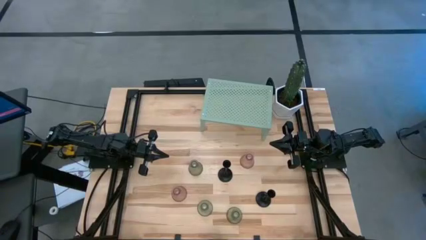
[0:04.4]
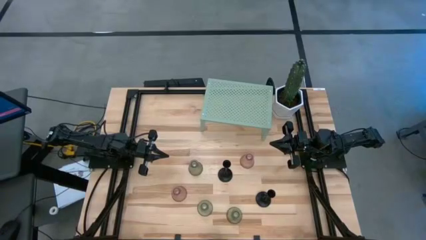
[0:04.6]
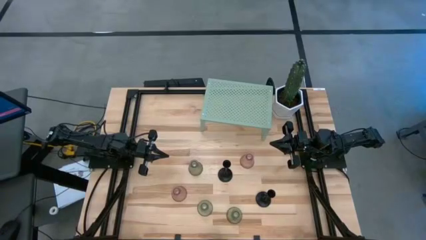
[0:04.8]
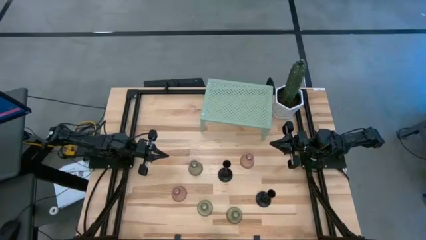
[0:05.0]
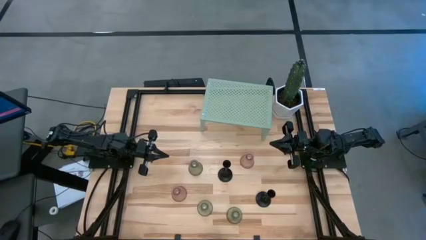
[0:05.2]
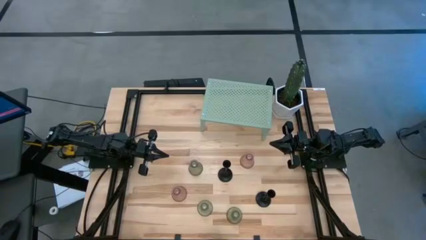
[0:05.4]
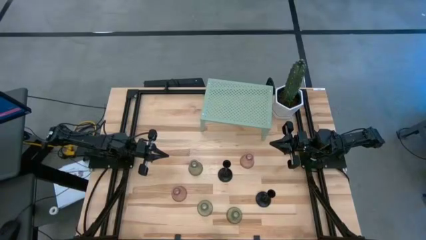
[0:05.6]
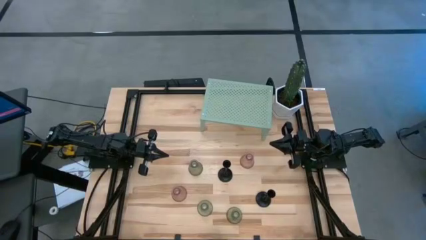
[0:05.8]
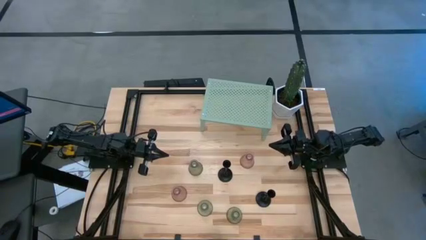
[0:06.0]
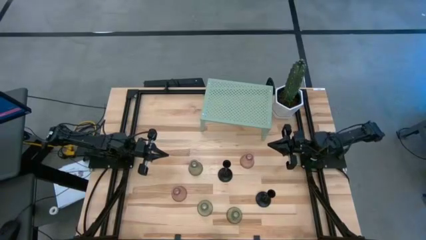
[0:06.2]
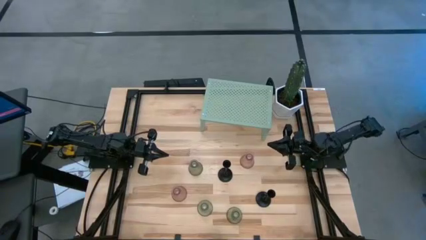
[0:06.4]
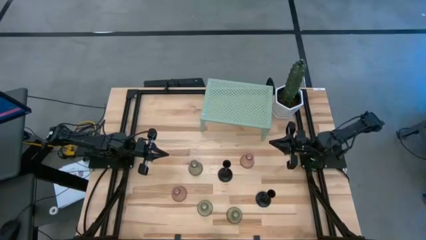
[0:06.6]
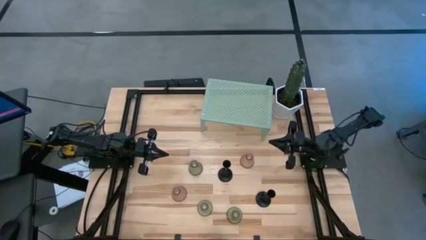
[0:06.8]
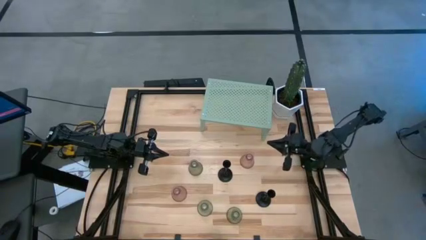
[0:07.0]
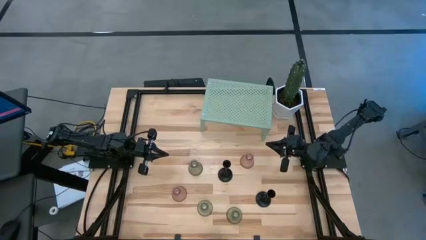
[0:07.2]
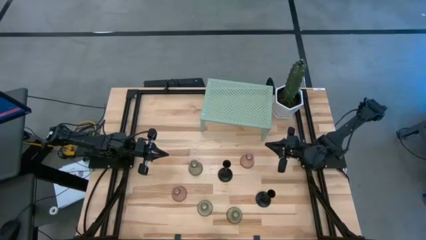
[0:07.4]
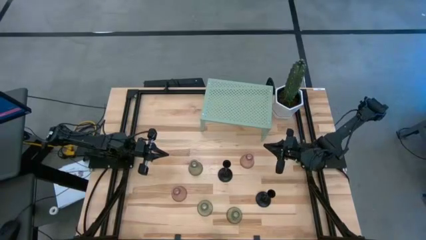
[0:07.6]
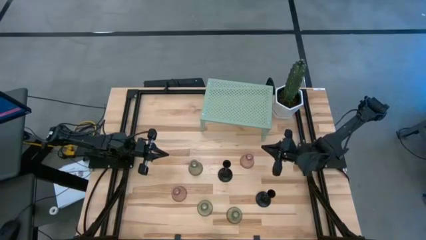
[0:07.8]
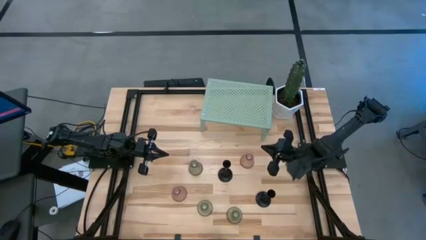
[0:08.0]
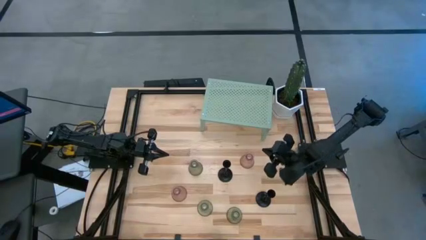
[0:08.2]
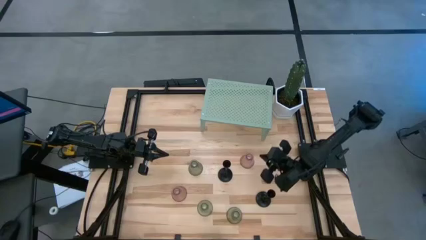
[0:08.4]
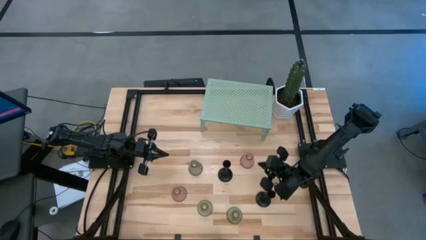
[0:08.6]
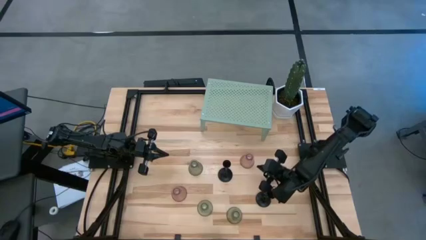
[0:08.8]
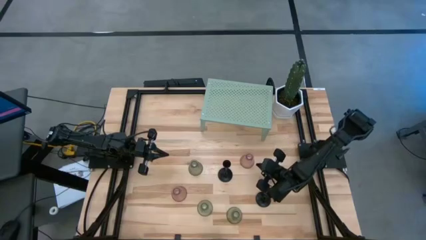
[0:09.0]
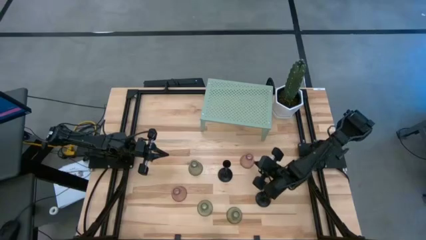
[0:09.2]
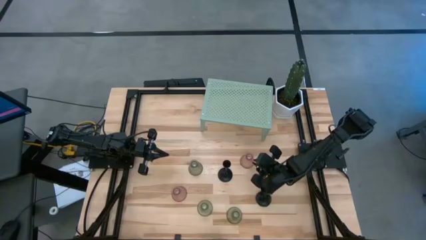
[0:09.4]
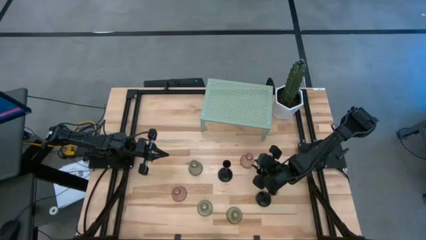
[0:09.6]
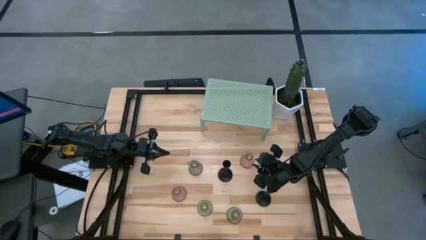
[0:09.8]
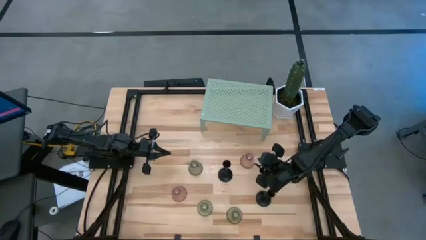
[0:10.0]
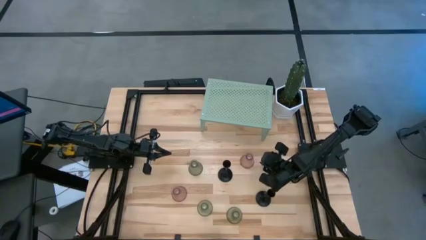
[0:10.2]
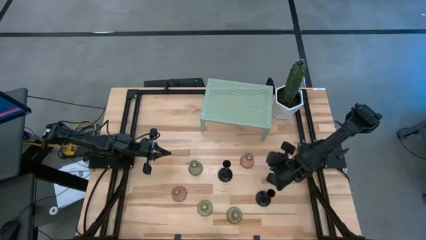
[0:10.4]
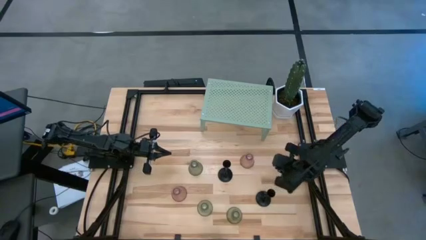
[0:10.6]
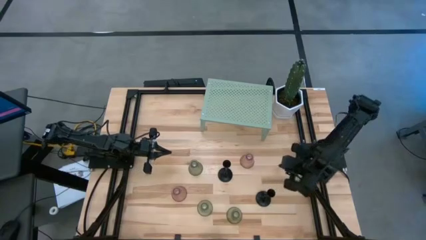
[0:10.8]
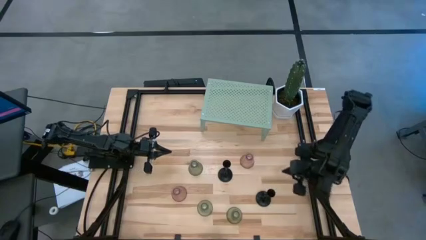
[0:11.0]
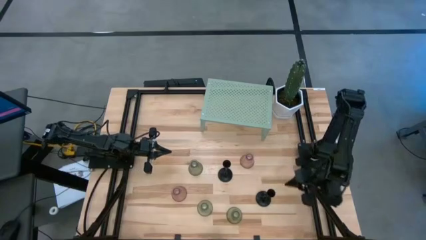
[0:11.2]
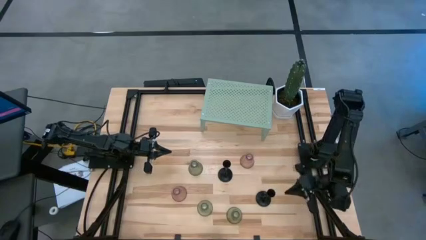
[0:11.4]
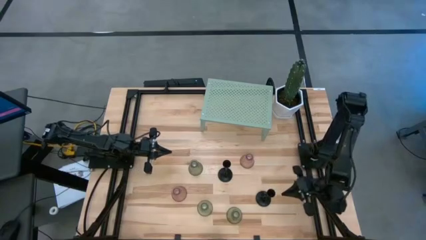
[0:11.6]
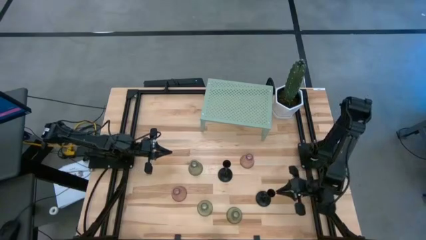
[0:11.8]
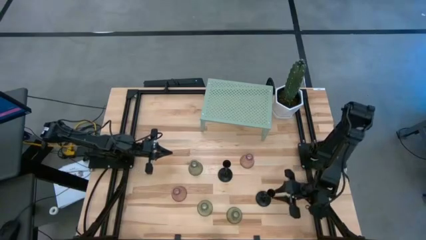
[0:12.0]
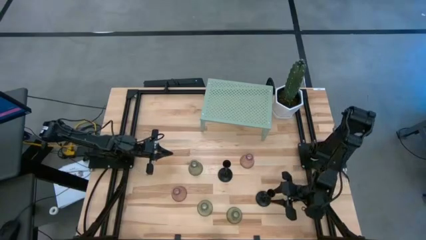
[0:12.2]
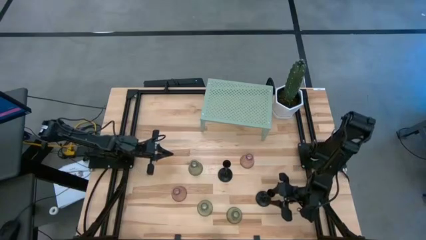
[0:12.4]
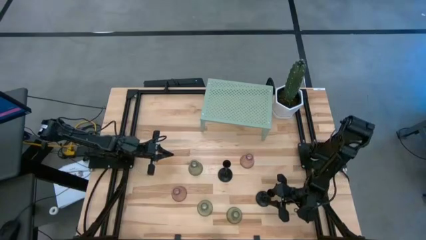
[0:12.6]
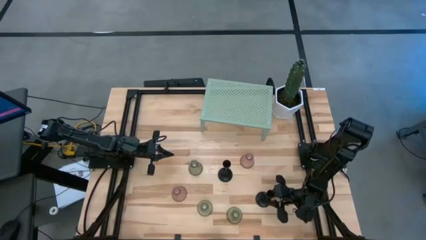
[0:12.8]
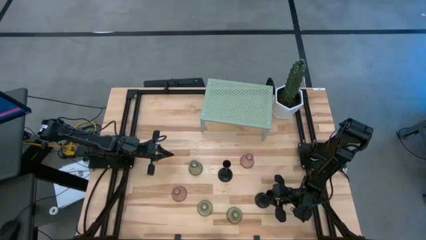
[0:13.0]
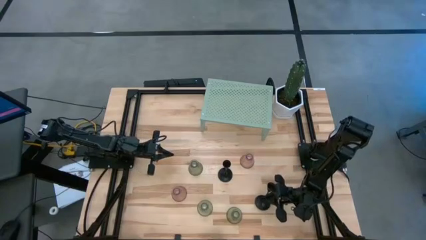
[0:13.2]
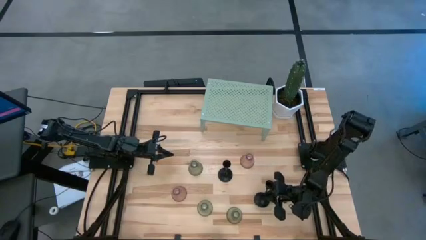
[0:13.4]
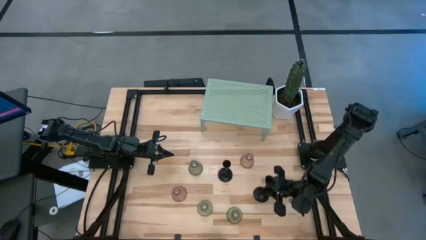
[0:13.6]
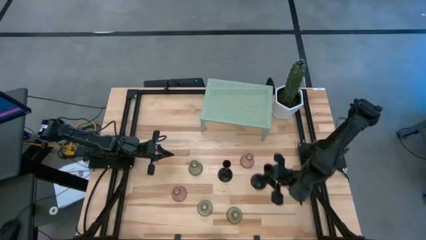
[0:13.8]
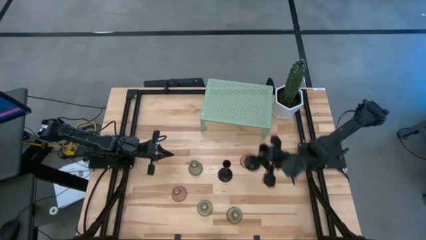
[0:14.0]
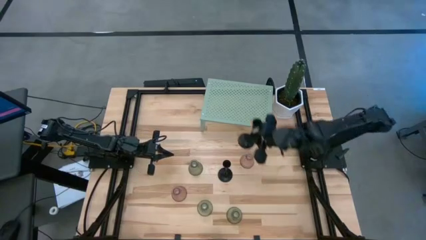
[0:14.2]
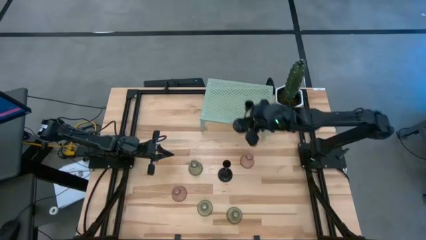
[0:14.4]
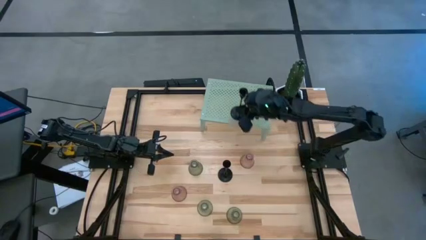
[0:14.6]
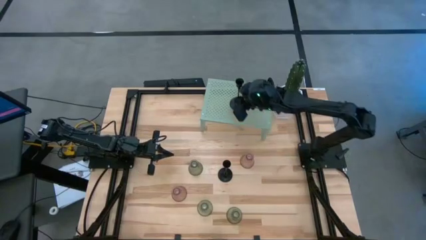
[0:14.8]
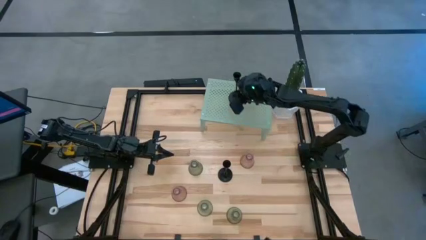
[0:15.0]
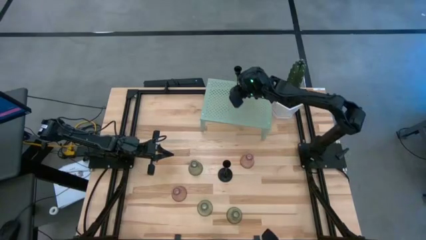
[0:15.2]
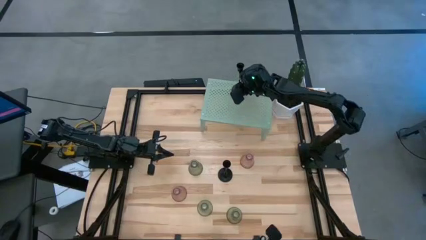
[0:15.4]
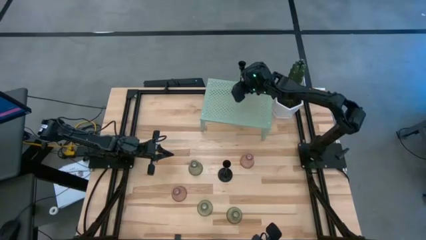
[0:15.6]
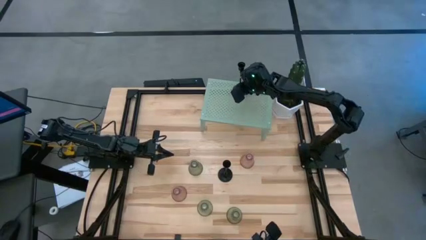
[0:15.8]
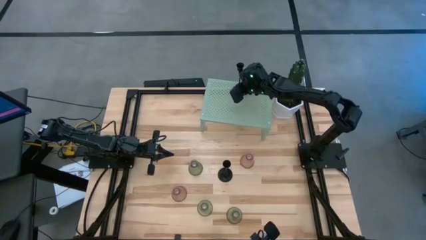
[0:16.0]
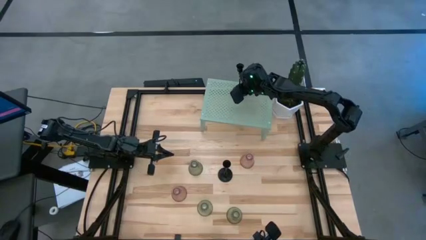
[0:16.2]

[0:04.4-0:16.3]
Task: Pick & Place candle stick holders
Put the right black candle holder on the shelf

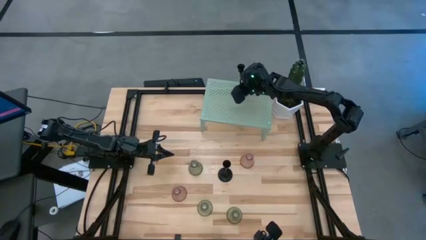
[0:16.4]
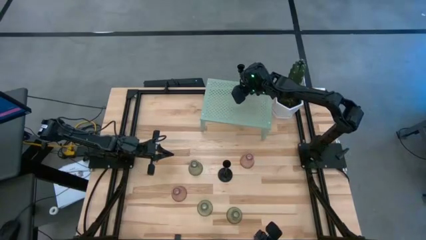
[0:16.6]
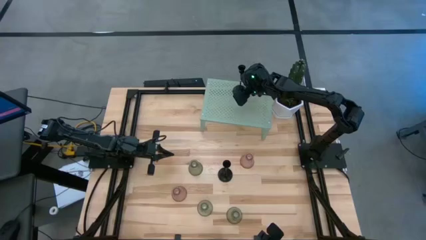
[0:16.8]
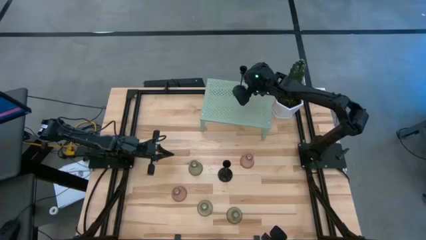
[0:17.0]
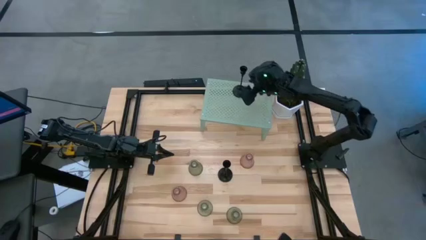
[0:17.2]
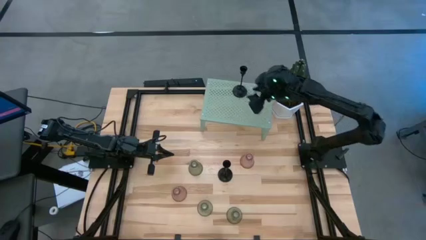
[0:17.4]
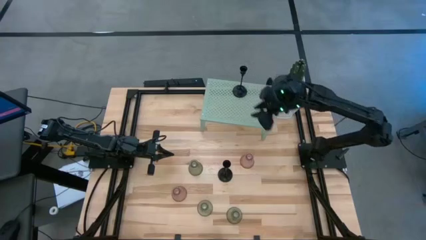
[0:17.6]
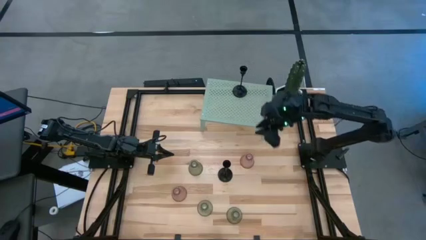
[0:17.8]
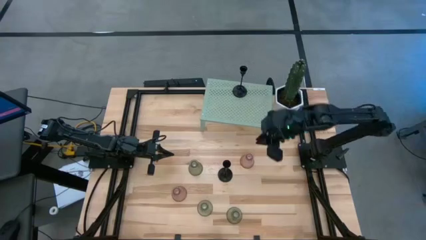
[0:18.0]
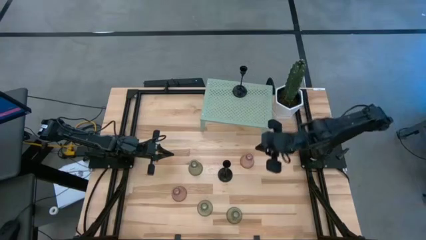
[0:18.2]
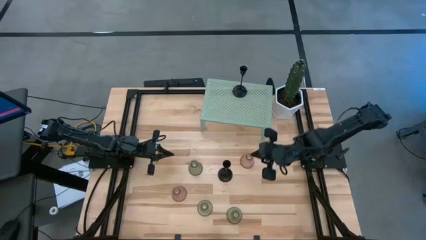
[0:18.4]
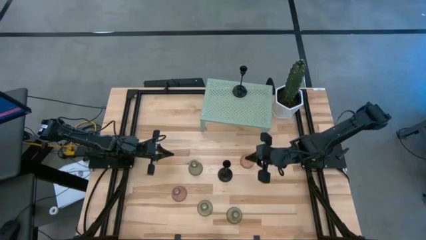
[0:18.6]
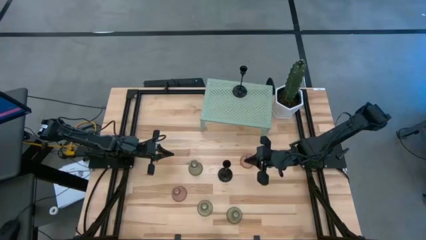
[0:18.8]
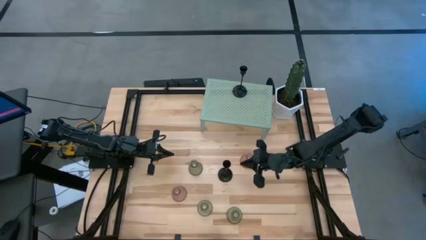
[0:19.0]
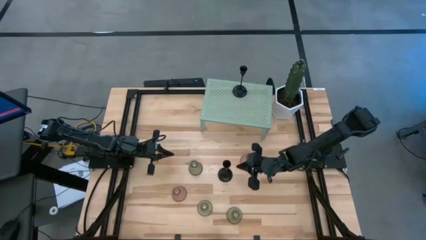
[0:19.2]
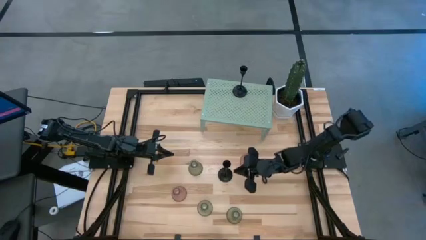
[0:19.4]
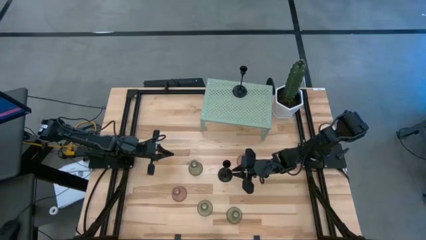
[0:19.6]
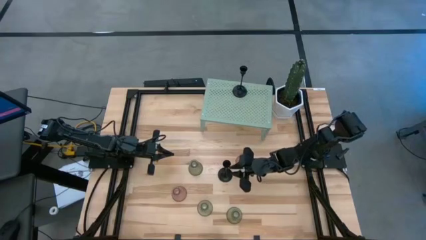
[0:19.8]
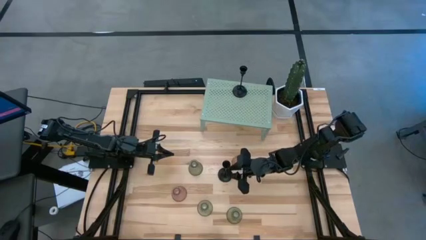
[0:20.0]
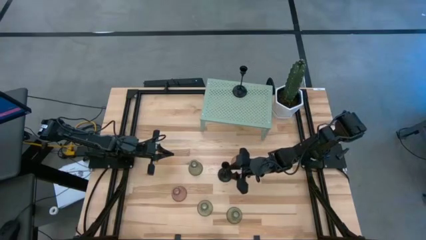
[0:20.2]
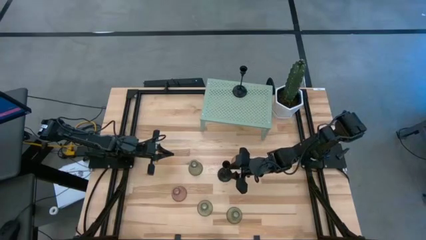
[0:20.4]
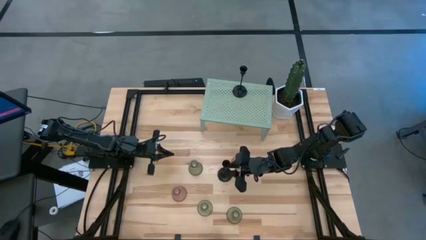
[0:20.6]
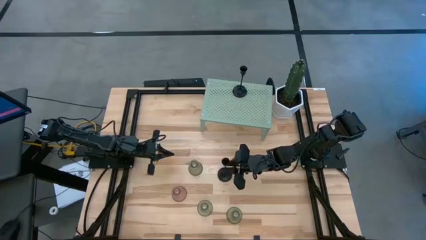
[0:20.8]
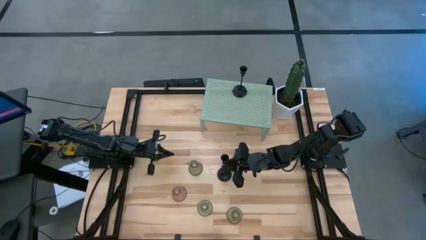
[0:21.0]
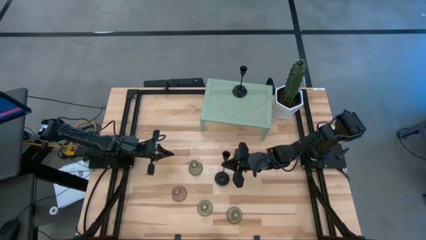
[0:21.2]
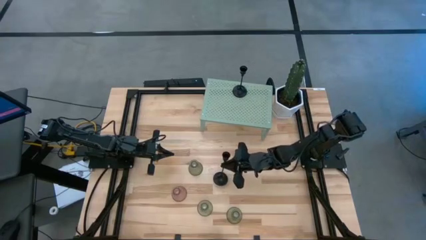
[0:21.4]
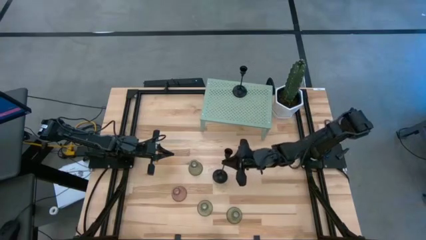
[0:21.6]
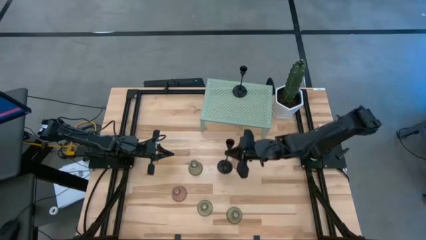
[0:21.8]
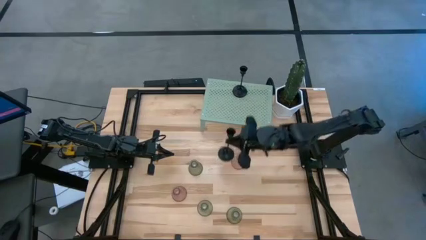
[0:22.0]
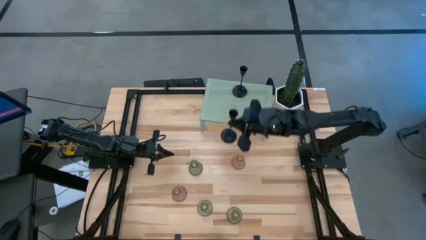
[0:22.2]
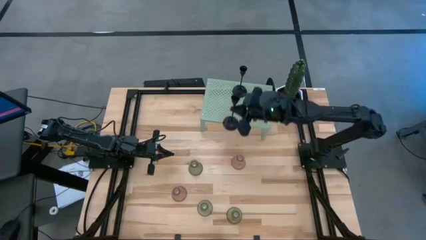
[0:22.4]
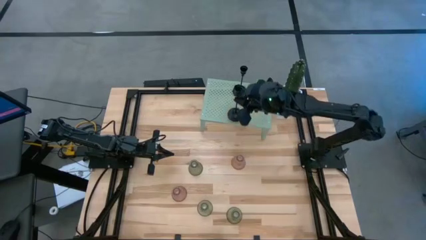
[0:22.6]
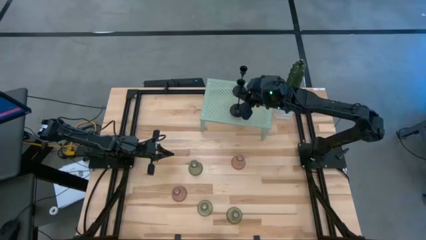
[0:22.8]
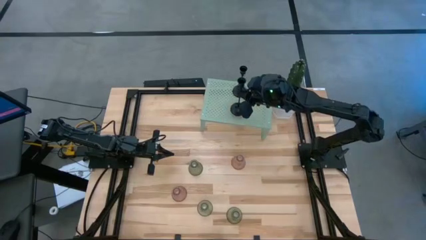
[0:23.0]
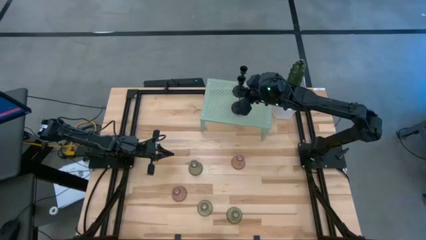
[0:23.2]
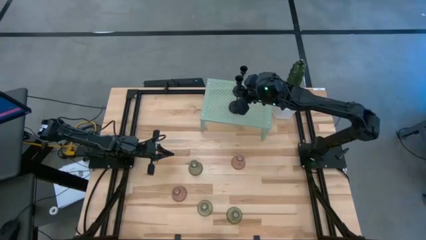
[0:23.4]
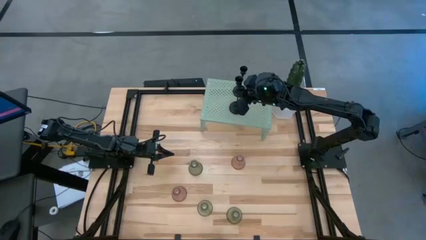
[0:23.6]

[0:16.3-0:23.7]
Put the black candle holder on the shelf
